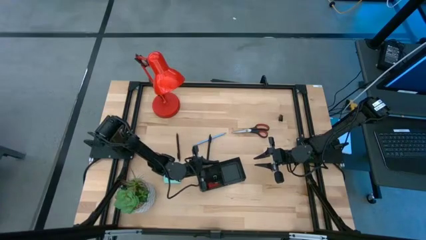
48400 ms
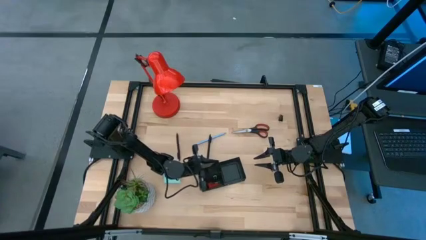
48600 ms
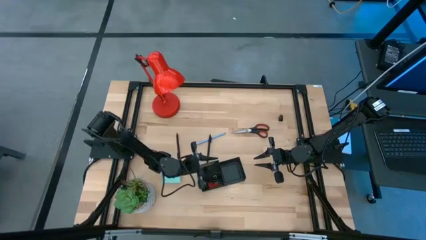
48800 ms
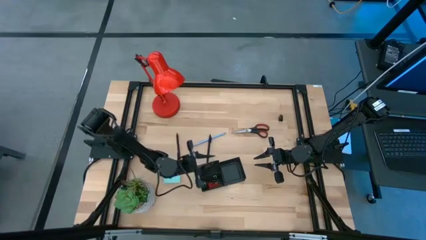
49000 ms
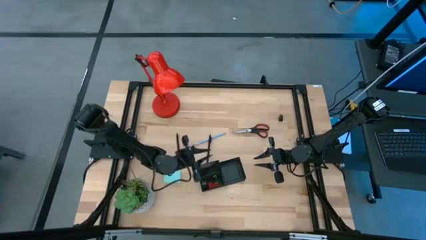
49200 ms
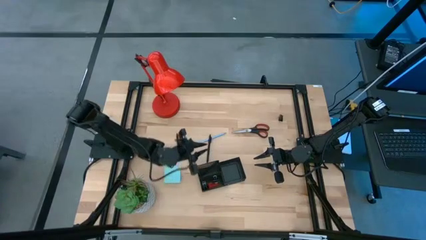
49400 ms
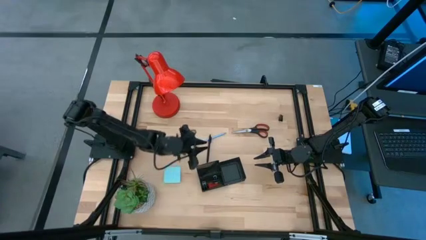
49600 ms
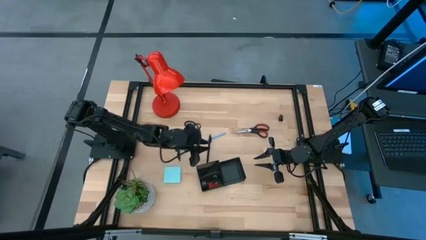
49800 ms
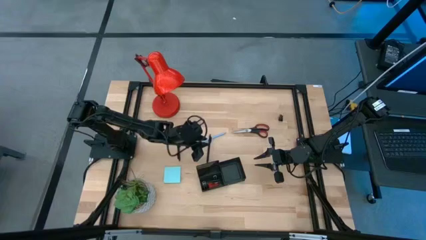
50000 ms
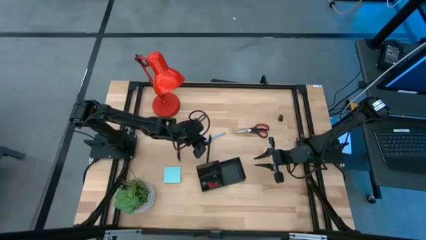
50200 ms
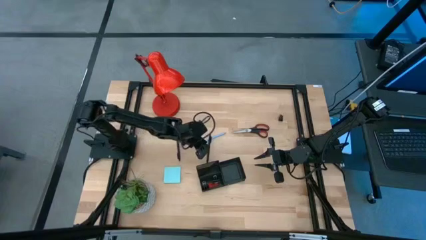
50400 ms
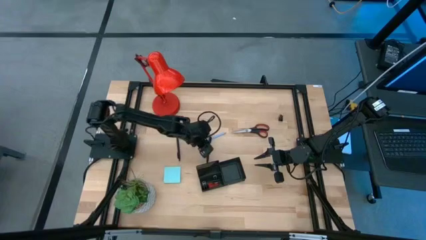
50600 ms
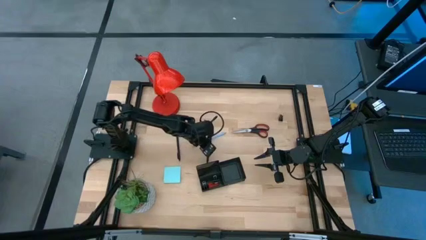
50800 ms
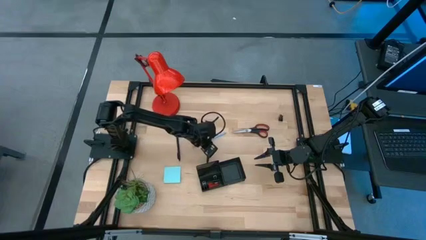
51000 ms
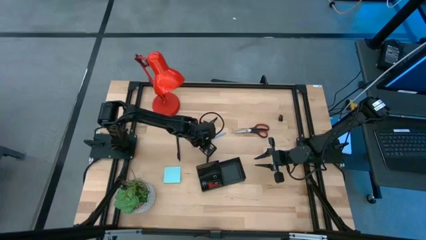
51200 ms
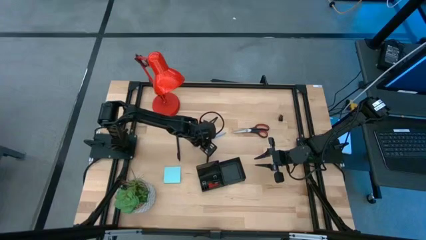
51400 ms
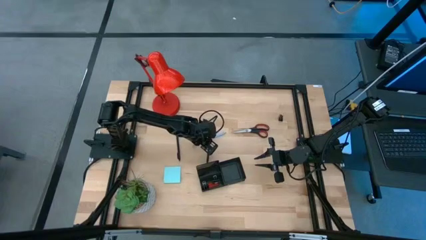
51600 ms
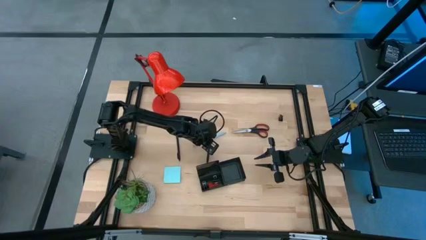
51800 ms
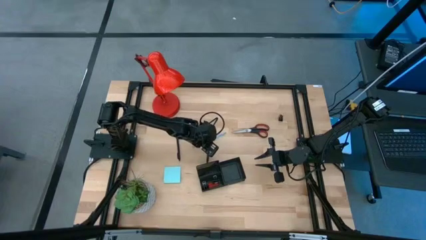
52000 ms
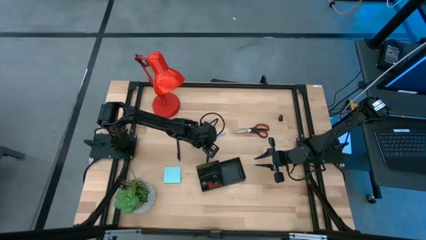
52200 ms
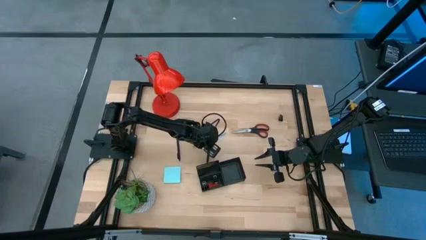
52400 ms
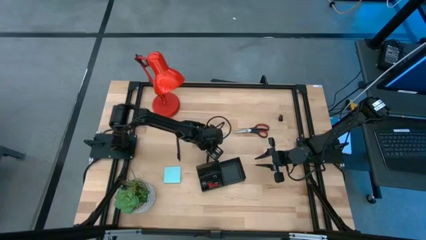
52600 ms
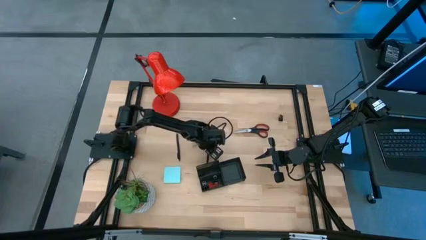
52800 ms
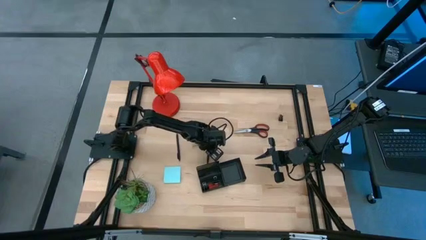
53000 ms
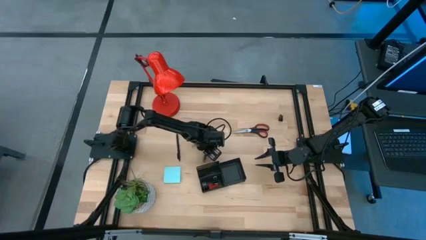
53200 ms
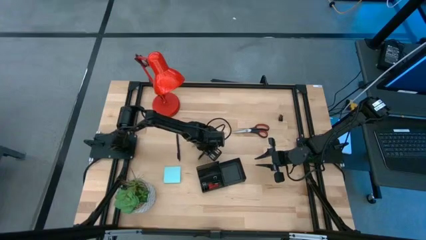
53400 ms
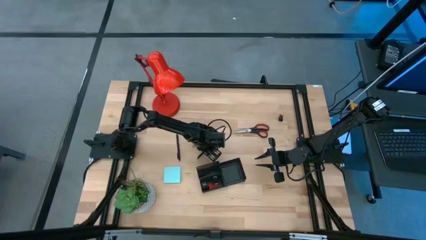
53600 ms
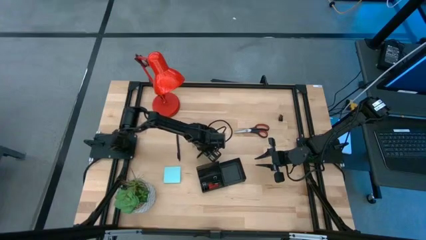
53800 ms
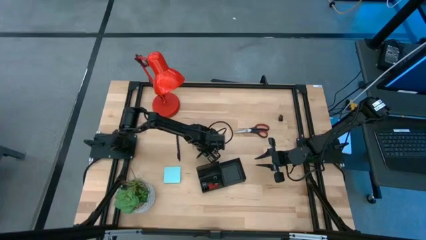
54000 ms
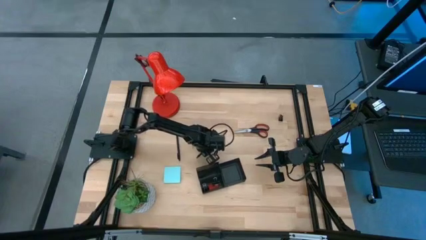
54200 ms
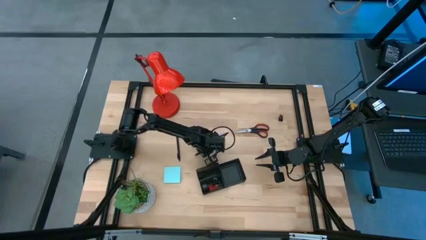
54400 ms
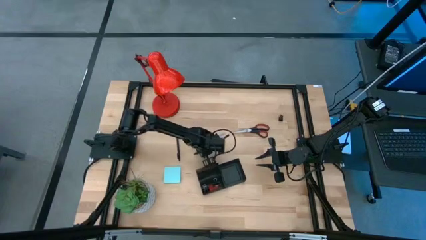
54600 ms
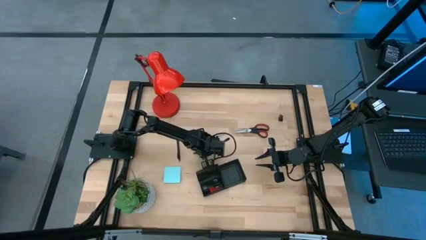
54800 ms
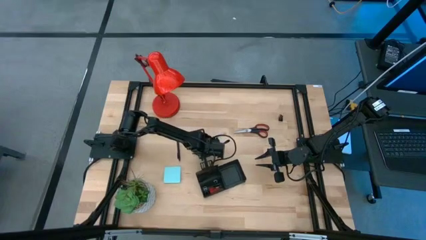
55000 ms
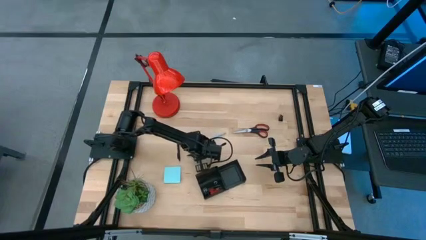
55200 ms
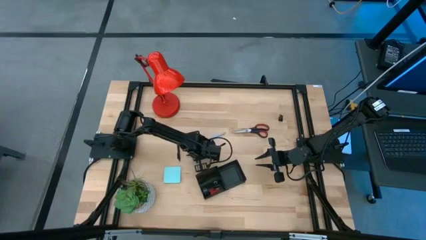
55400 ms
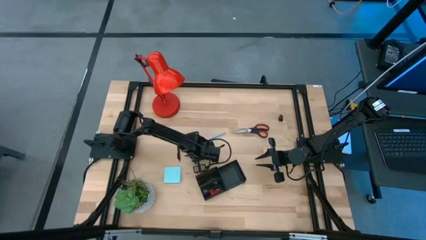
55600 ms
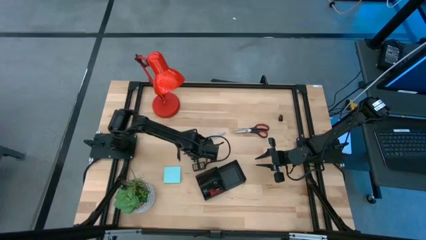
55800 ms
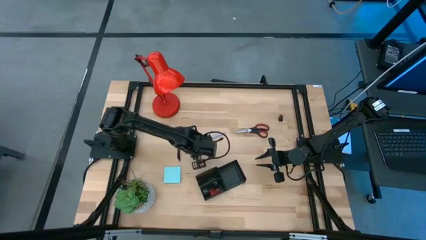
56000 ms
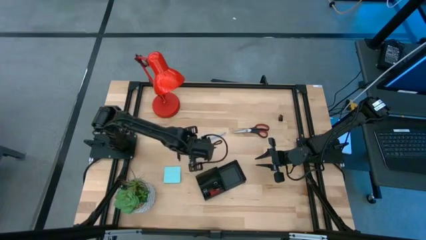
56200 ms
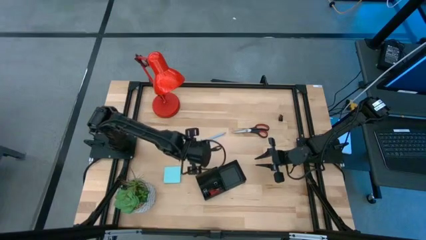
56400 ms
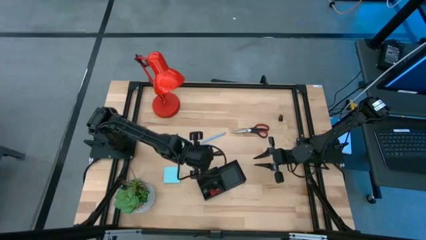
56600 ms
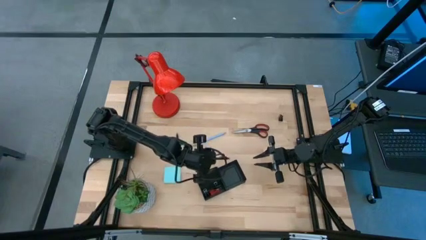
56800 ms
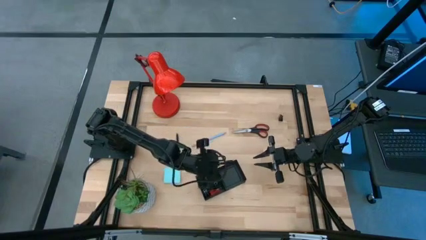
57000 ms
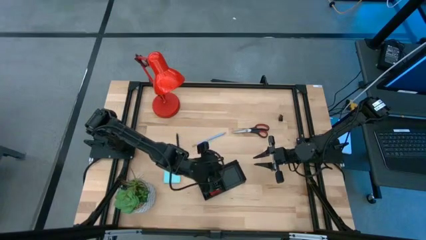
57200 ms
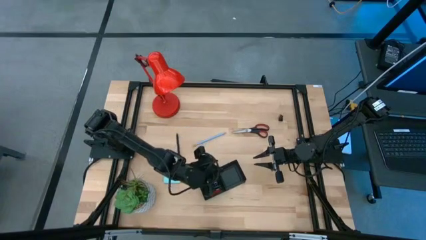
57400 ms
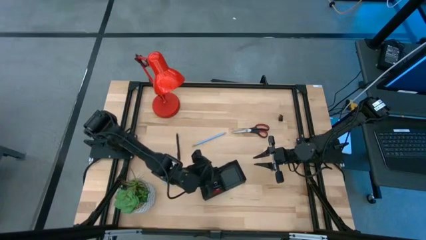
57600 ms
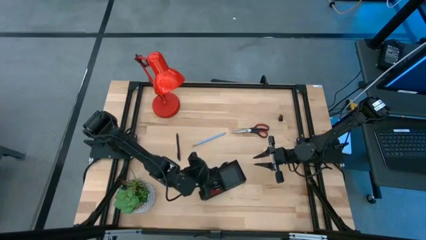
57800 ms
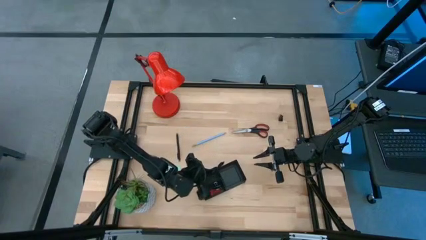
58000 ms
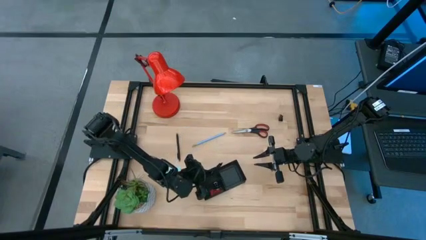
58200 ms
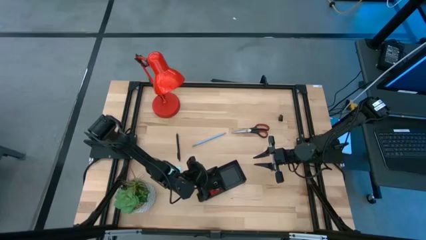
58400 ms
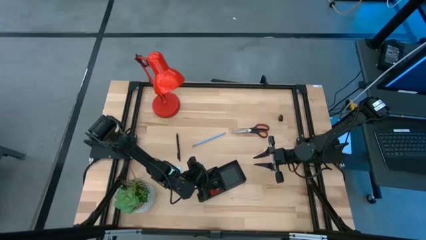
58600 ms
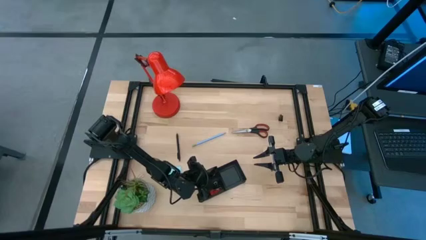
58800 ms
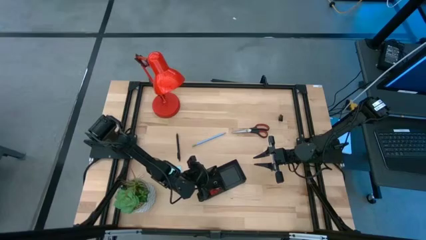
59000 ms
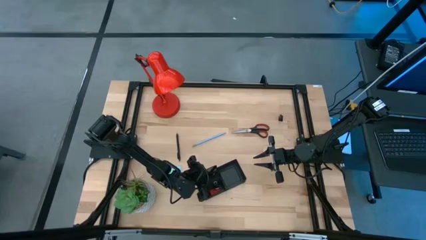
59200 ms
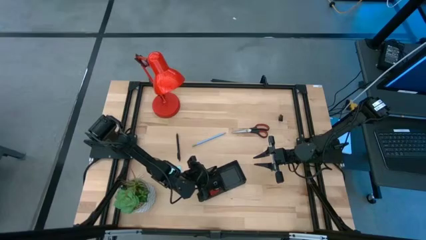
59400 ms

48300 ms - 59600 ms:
Task: Pick and place office supplies into organizer
Put the right black pen into the black desk organizer

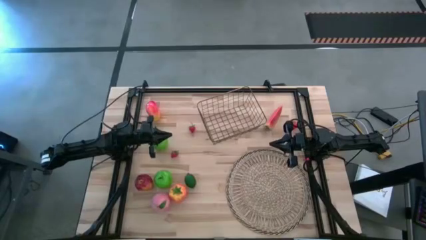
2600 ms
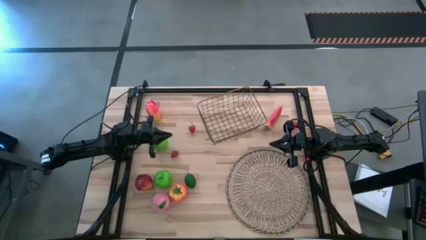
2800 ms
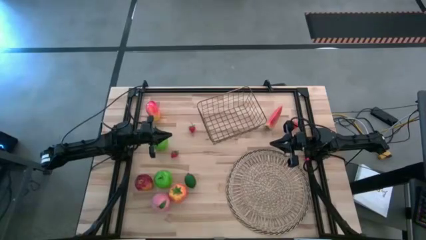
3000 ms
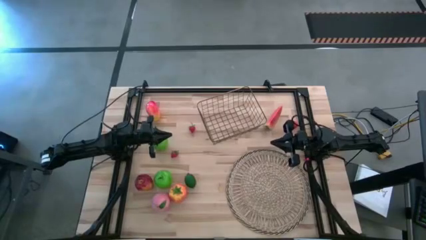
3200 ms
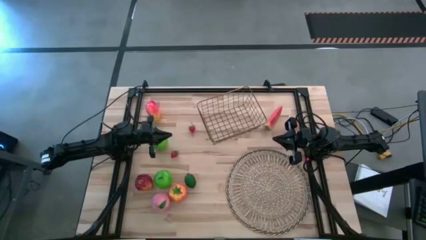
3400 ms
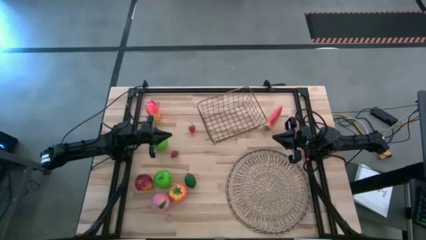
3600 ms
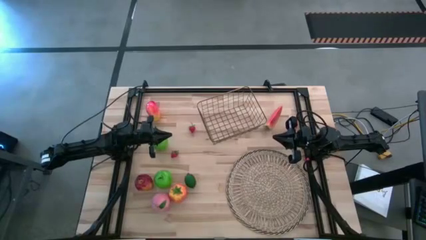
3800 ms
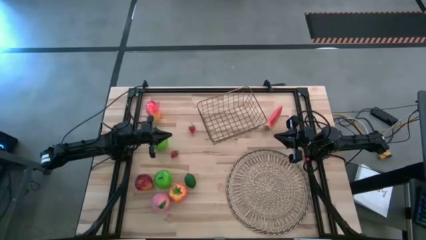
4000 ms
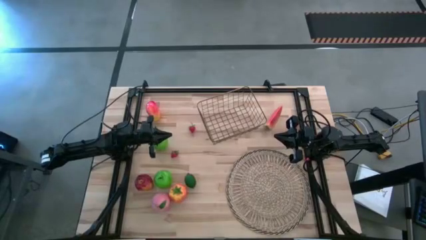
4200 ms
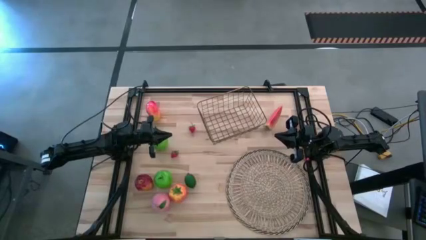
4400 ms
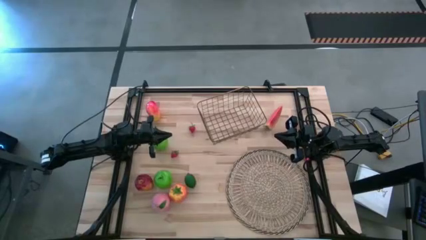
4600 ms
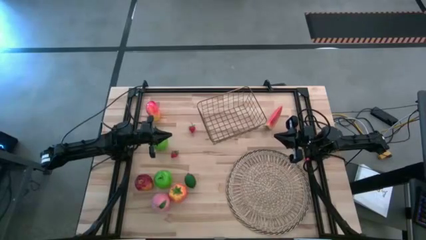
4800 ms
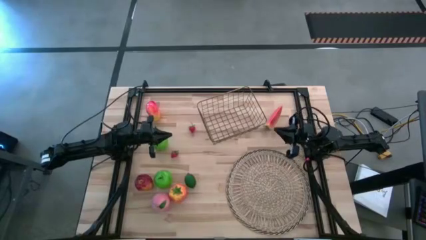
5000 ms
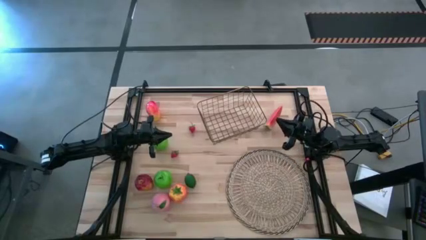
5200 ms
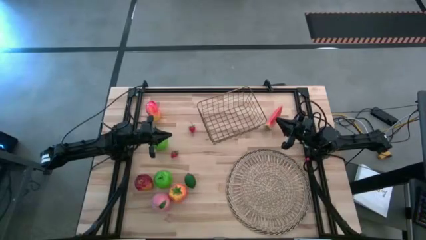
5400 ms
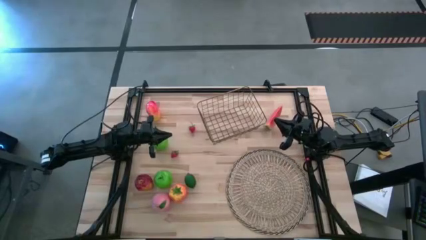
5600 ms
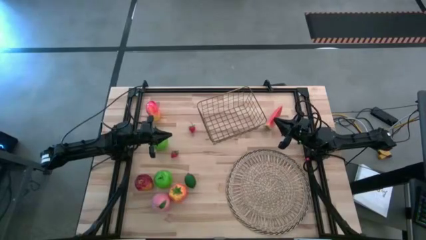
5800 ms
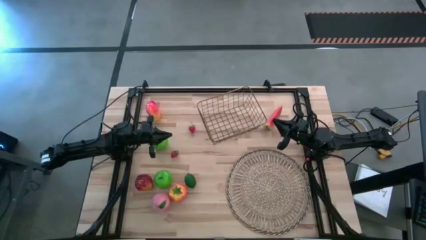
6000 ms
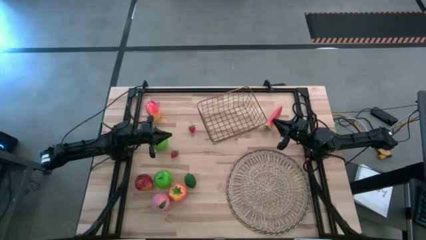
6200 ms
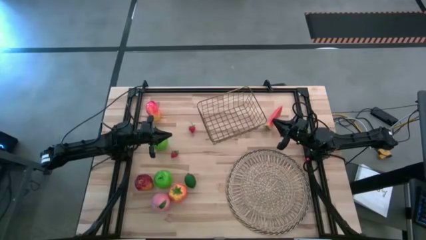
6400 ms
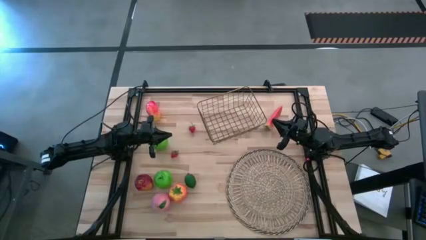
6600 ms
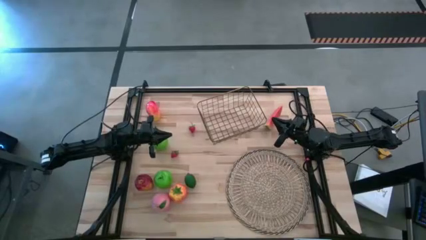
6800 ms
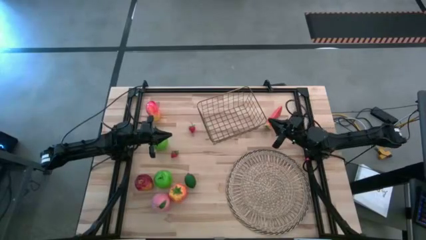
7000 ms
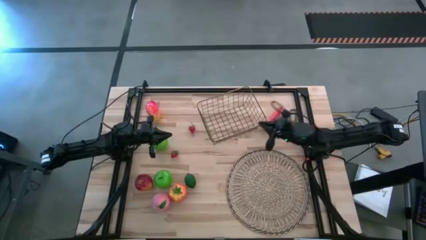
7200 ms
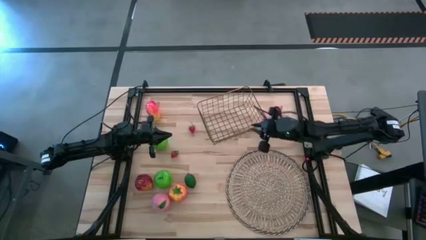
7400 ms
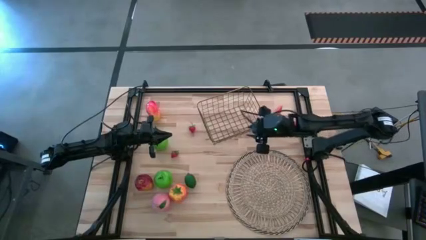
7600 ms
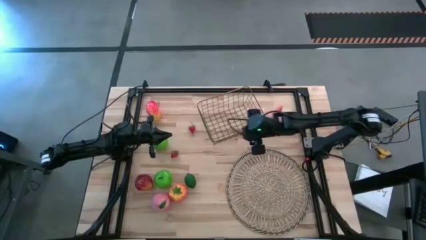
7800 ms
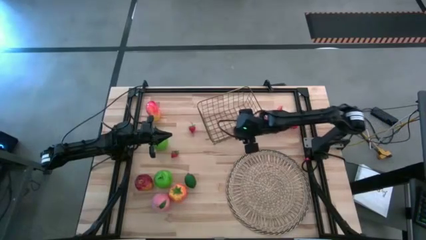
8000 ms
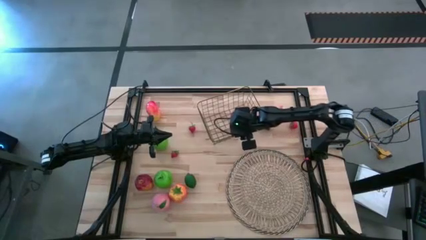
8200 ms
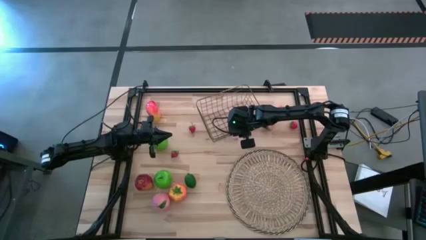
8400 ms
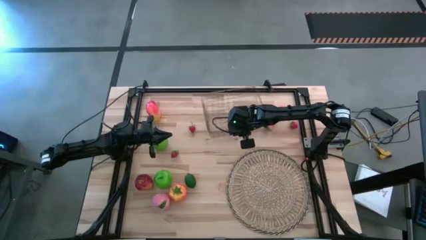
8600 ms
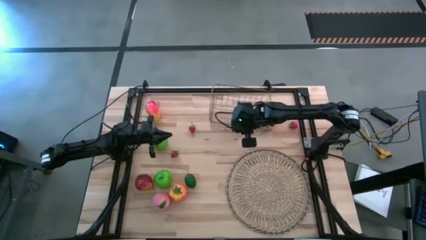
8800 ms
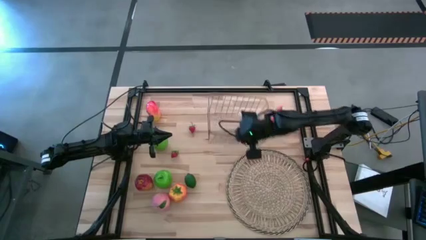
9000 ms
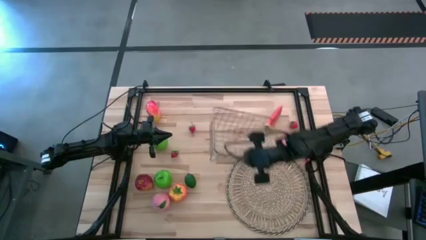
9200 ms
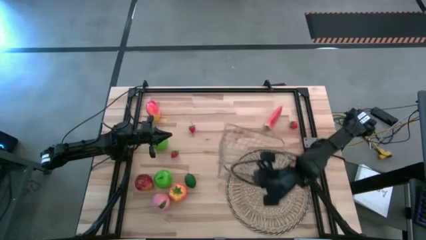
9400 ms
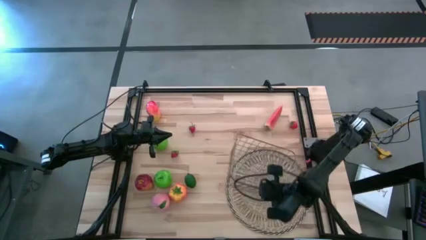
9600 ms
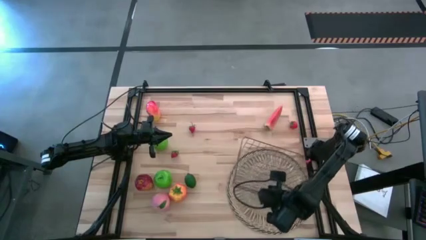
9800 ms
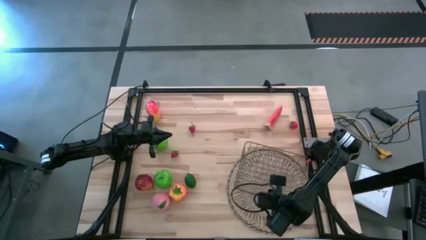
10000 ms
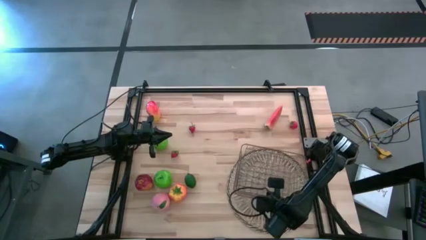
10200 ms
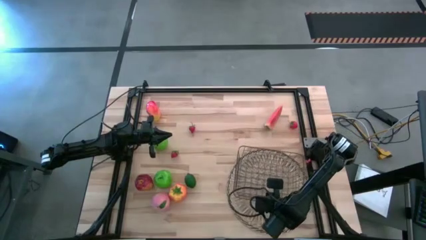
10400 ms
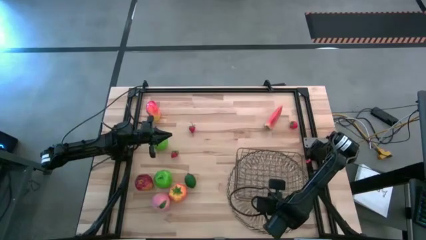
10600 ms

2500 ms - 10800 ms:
Task: Build produce basket
Move the wire basket from the top center of the table to the bottom right of the table
